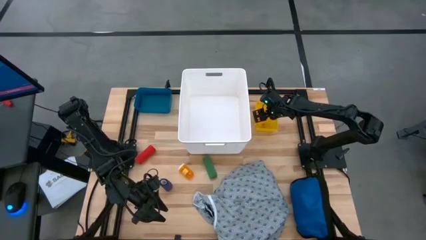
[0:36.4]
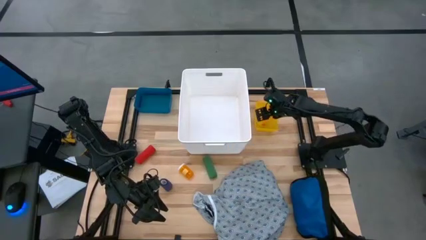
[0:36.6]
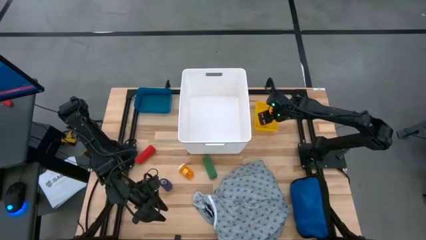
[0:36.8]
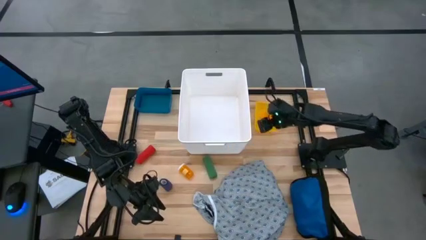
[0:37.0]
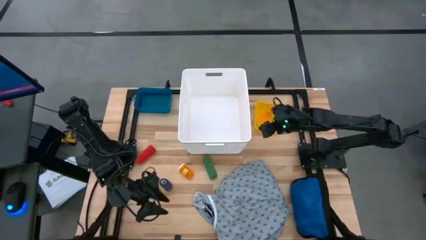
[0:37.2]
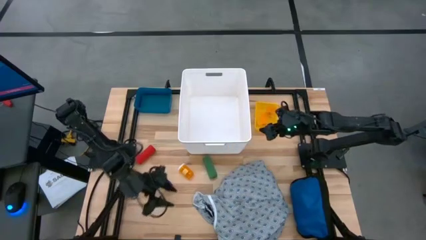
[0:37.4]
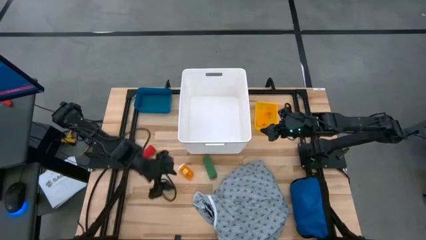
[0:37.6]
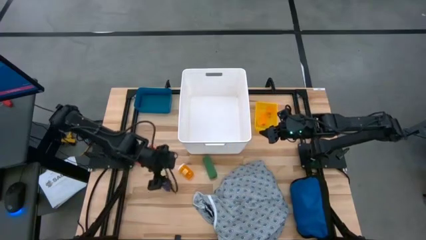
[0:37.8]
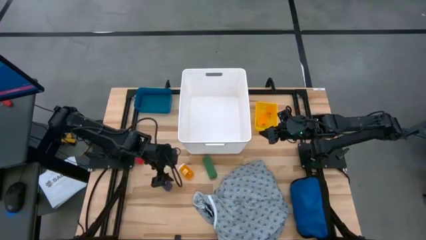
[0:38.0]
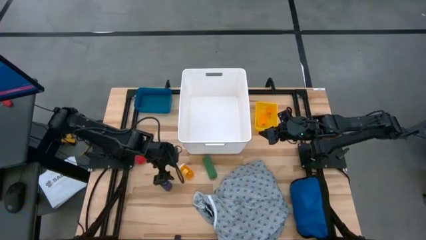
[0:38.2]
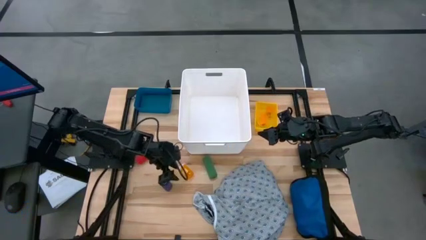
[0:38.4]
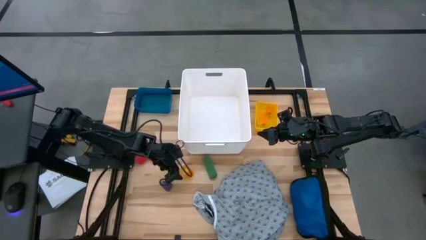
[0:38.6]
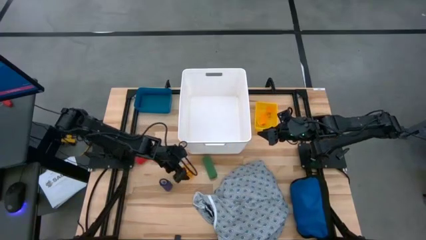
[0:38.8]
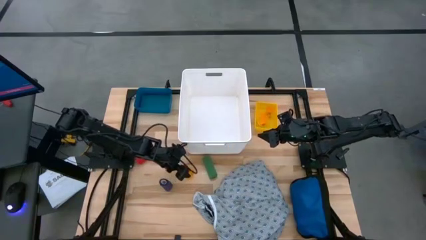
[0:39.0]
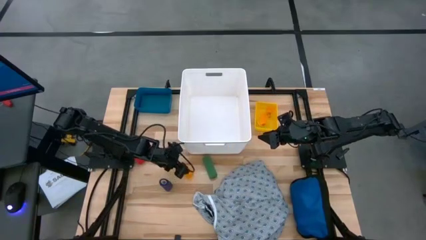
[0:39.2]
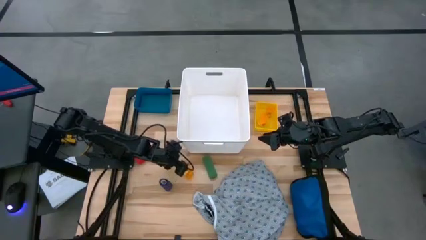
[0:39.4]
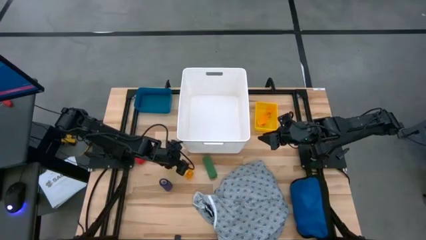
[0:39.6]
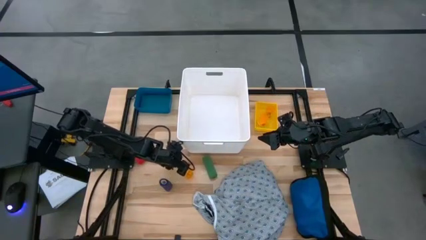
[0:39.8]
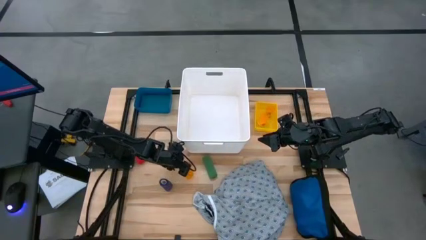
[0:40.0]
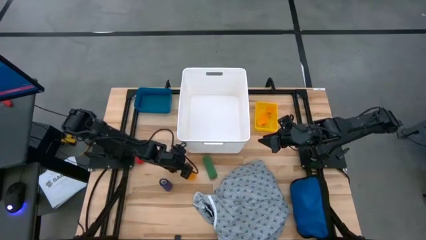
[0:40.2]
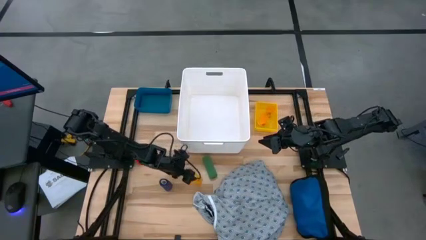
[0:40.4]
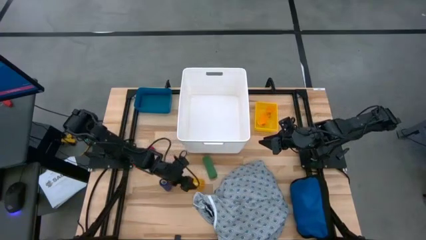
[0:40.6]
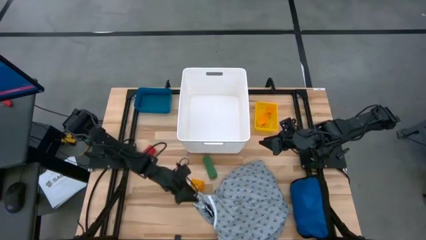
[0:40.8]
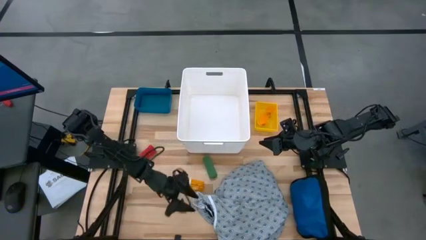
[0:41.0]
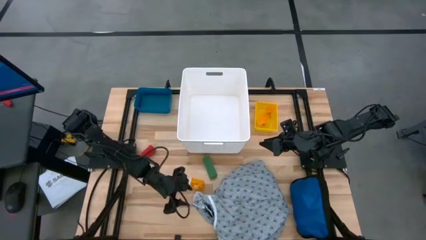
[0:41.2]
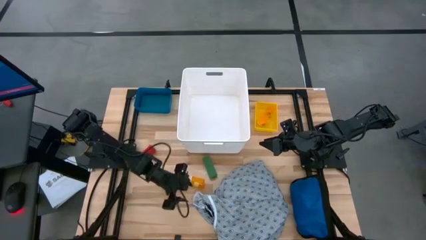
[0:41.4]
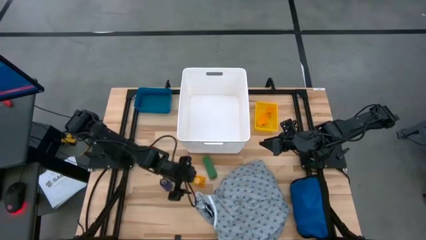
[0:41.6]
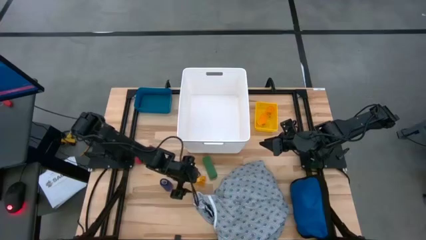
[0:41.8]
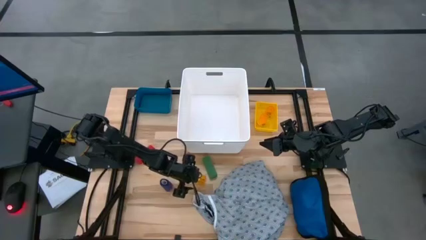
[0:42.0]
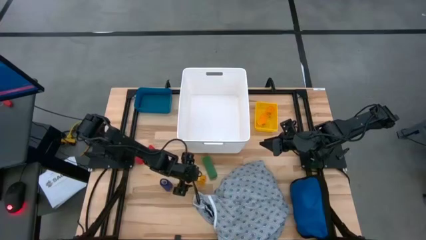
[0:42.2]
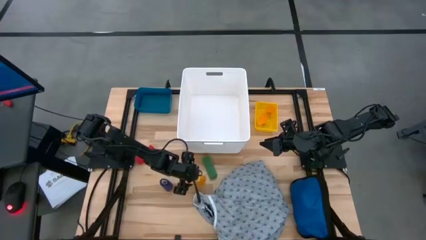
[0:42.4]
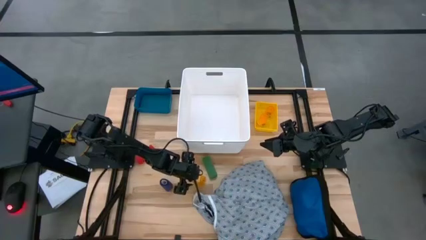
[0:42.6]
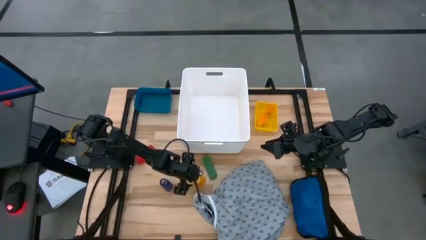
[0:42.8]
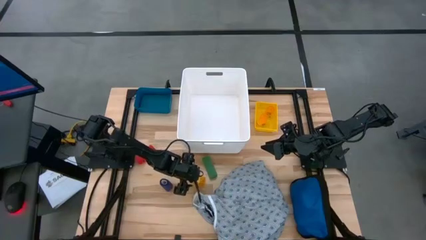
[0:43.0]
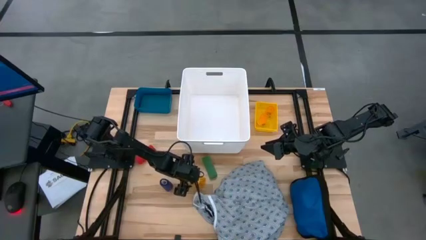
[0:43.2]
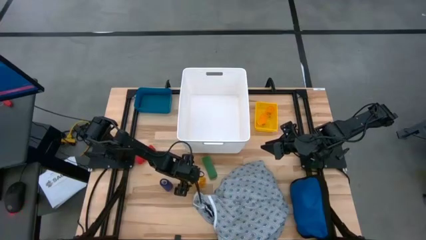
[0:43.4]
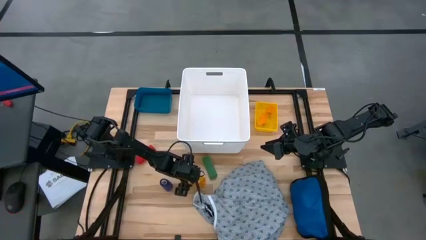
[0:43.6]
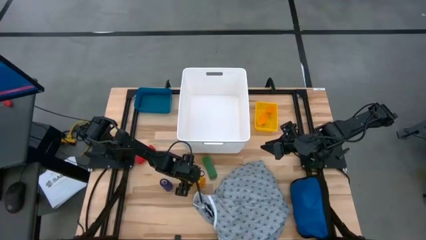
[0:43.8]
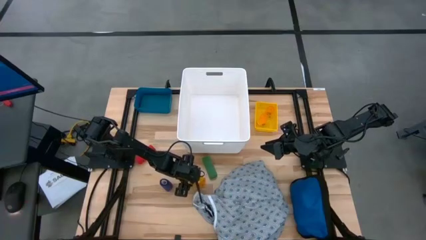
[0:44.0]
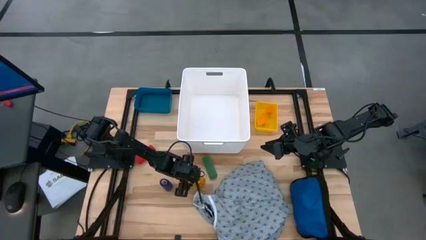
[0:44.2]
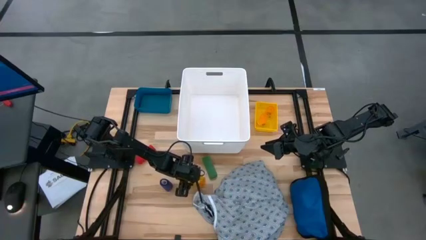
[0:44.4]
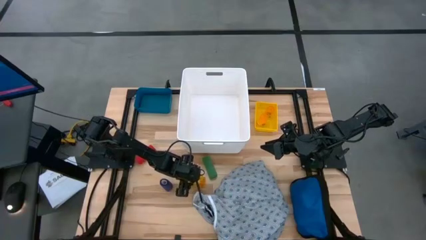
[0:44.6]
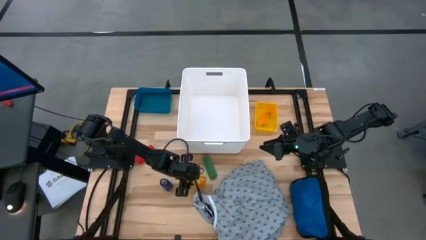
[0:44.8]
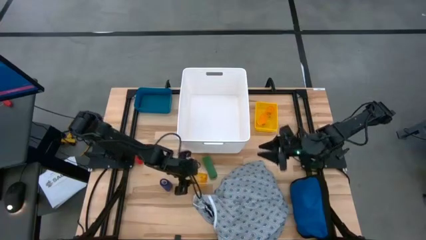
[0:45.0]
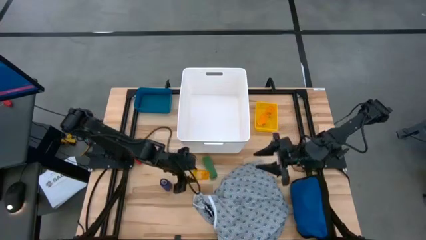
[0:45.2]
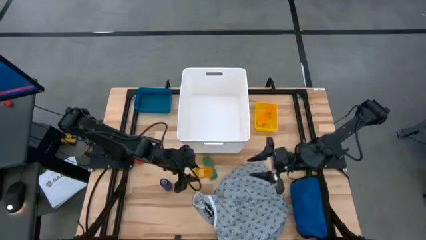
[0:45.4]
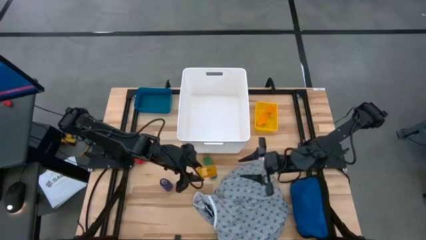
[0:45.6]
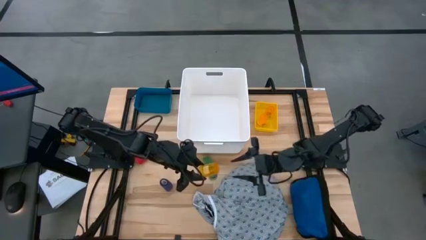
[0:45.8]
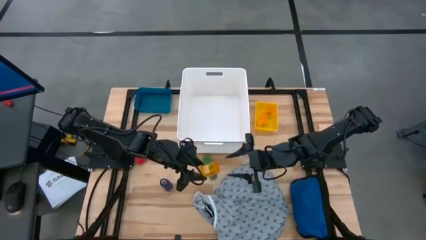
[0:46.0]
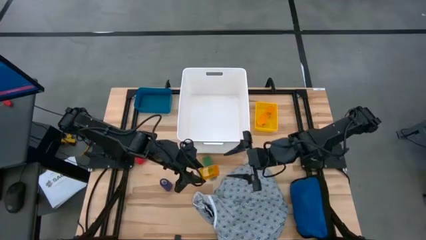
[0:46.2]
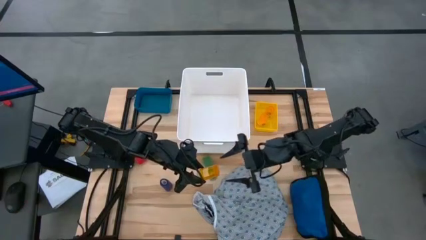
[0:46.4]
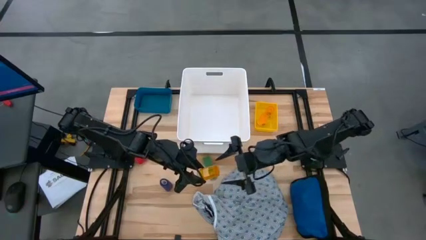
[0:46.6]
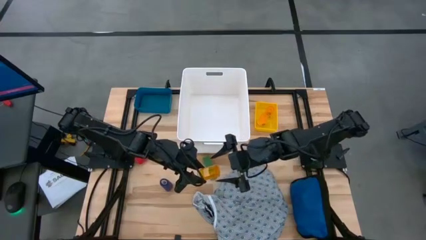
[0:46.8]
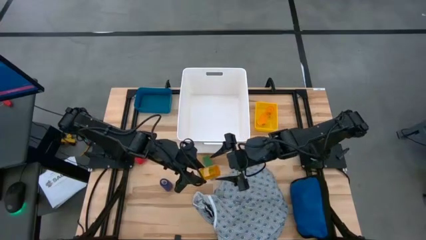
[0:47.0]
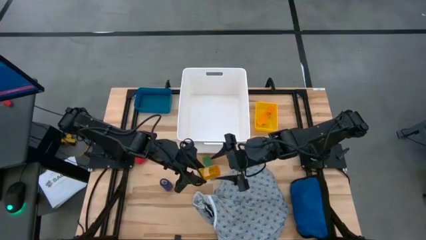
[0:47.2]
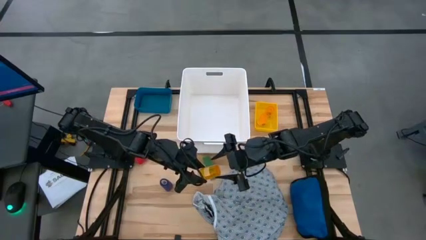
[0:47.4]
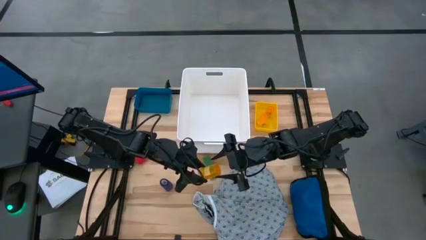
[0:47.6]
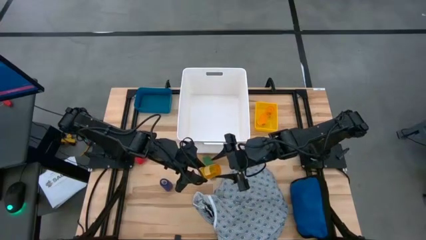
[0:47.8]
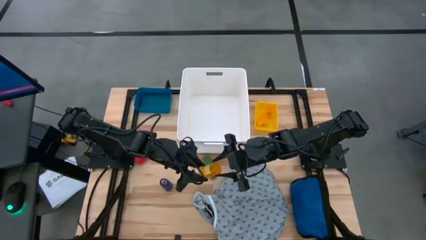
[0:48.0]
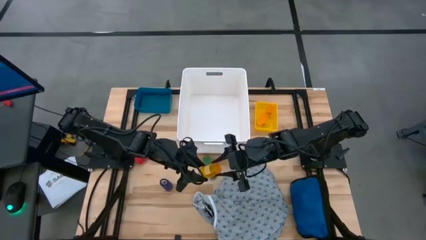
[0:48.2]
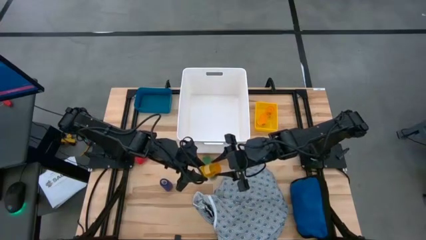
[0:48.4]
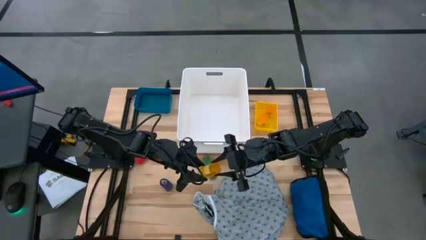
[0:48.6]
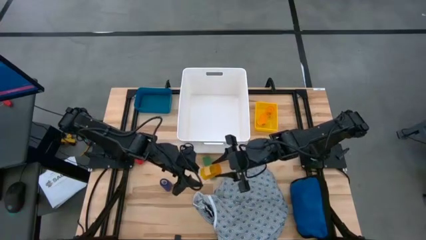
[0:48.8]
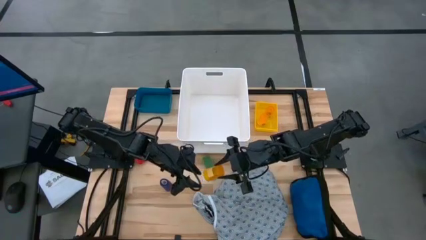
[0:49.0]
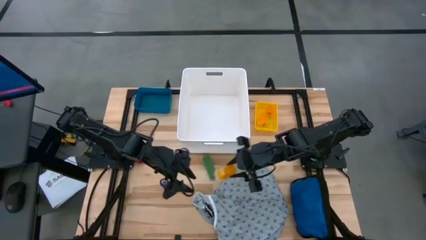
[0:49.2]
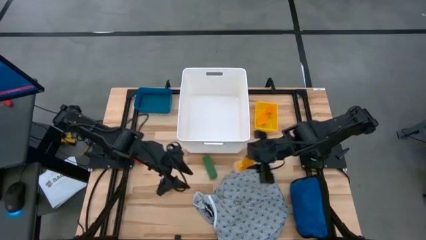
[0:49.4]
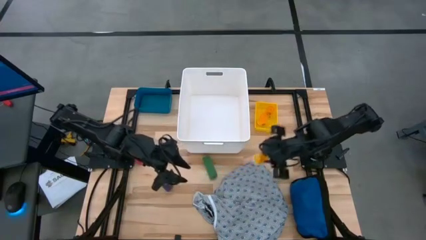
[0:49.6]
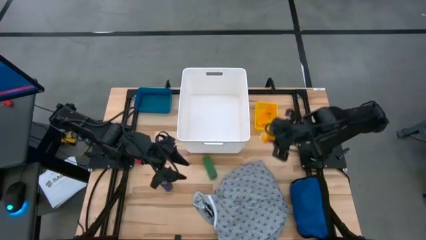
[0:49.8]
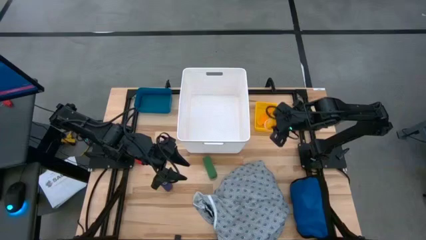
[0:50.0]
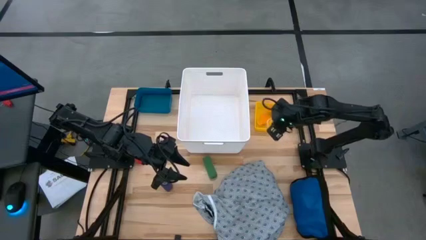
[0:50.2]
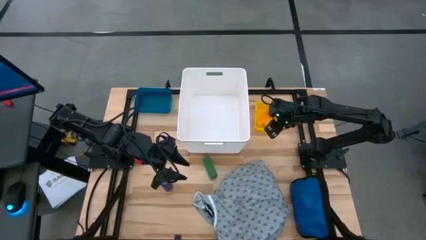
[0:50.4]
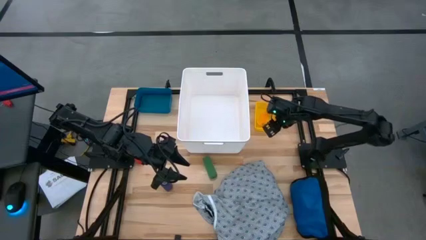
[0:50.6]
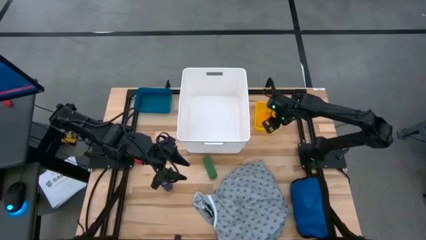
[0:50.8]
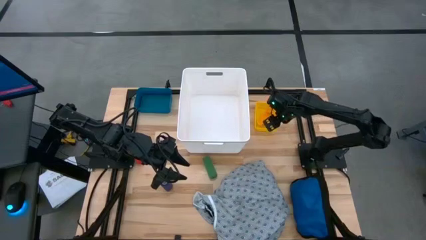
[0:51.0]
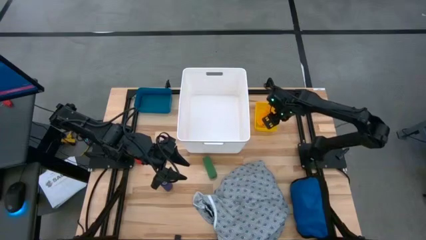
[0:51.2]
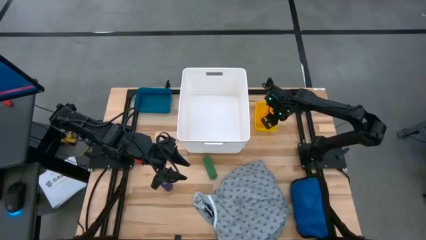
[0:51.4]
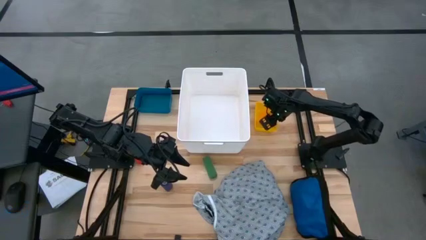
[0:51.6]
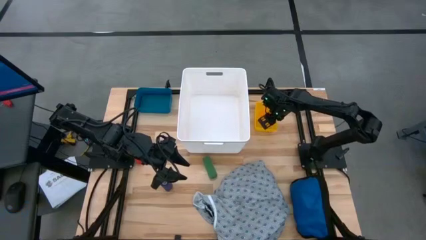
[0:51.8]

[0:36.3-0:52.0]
Task: Pick & place medical supplies in basket/bin
Put the orange pill bottle into the yellow bin
